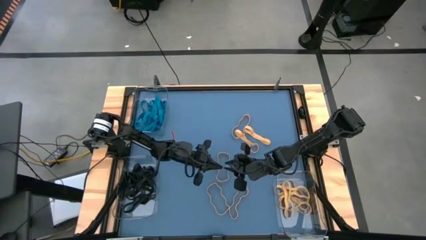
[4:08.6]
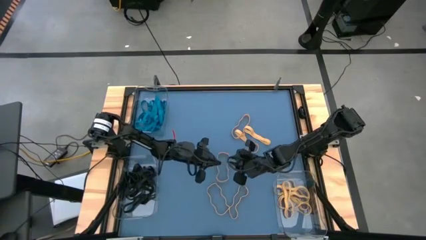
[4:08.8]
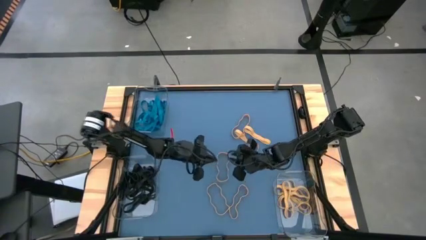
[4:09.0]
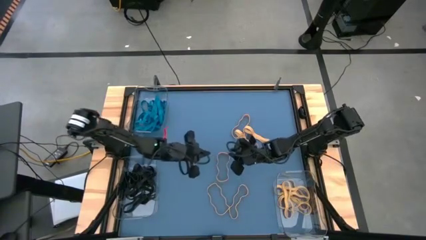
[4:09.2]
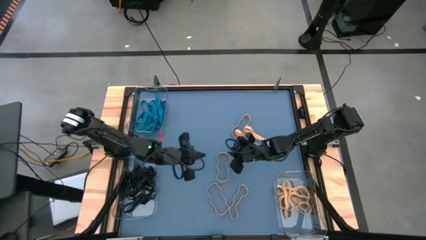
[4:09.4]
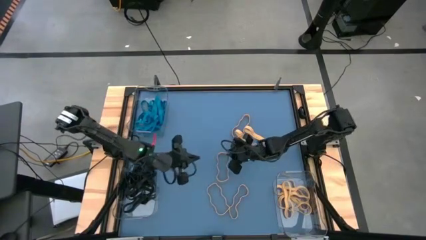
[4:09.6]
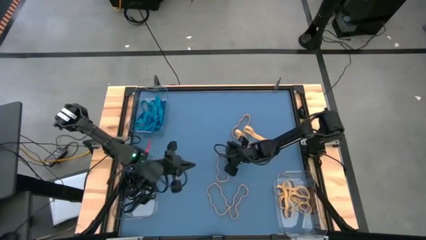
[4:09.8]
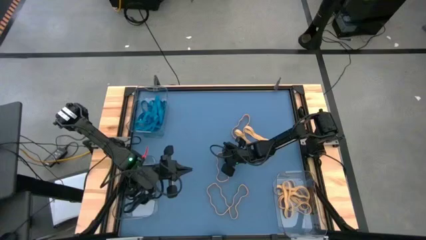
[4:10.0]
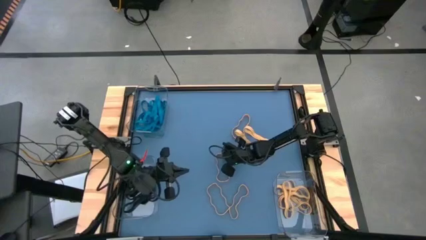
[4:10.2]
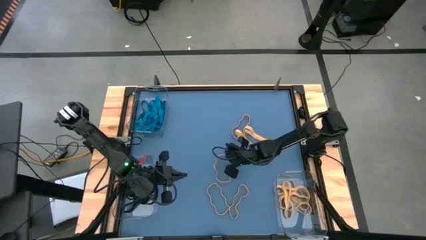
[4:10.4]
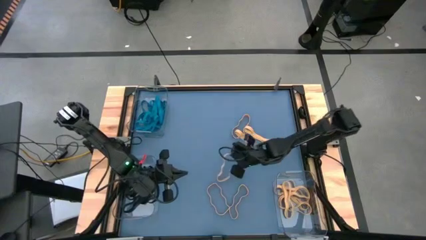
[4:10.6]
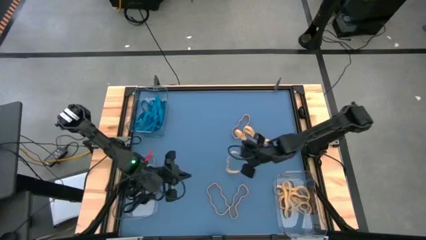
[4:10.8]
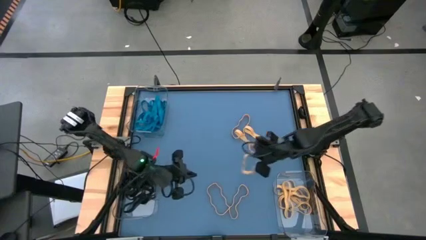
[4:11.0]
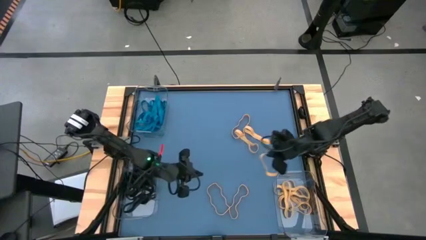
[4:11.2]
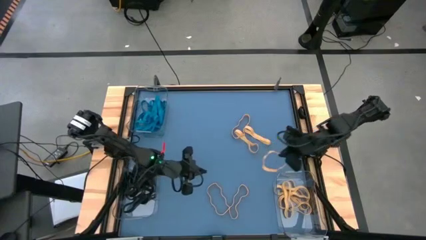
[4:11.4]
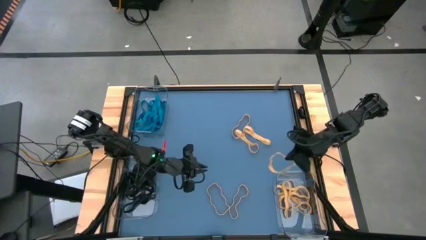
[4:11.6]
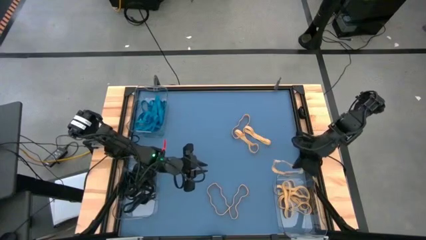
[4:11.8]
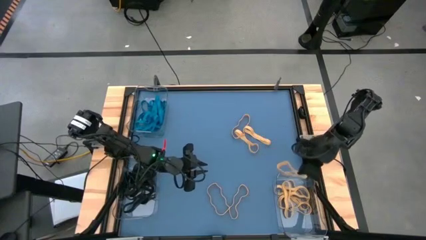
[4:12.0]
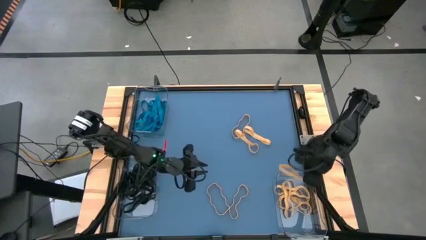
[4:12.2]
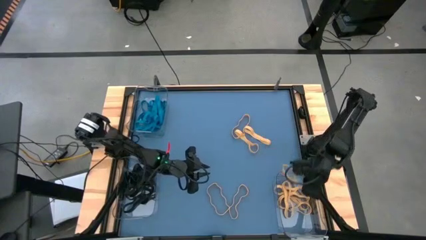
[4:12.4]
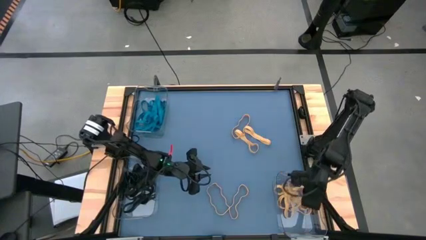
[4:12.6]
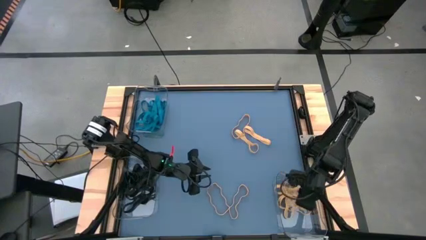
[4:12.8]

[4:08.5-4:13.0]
Task: Sort rubber bands into baskets
Put the yellow rubber band into the bottom right transparent bin

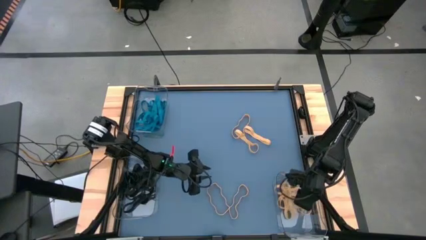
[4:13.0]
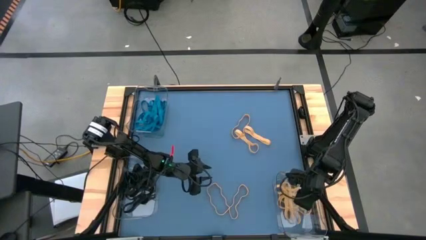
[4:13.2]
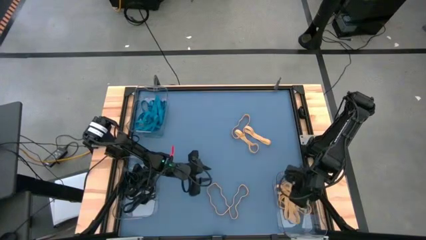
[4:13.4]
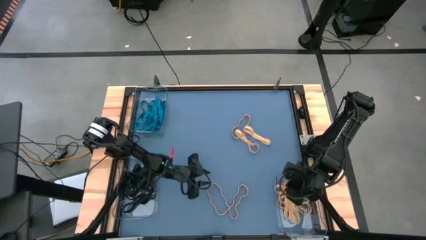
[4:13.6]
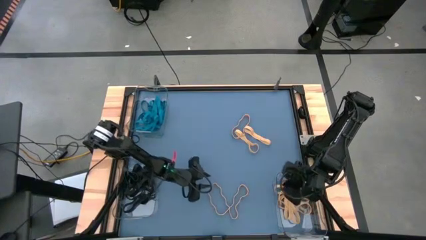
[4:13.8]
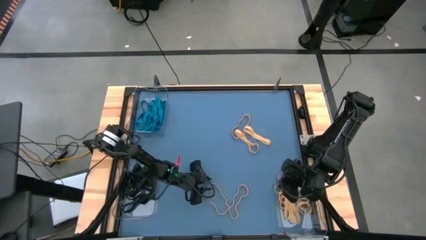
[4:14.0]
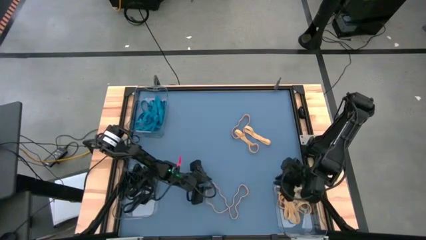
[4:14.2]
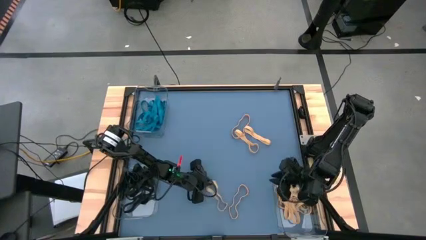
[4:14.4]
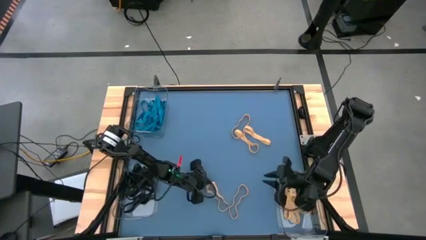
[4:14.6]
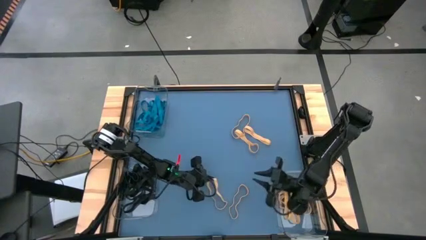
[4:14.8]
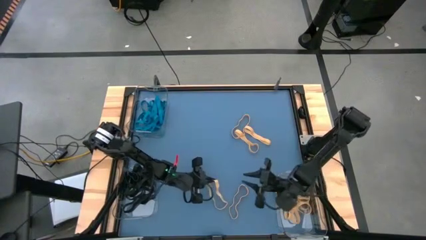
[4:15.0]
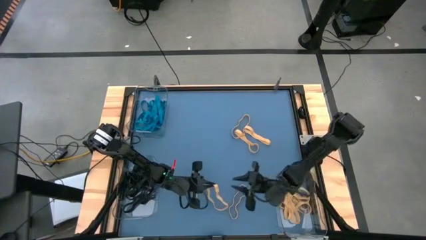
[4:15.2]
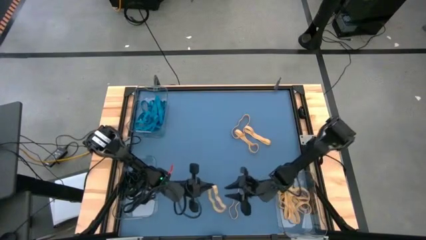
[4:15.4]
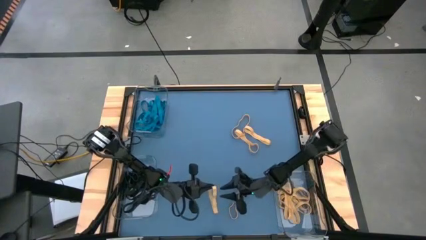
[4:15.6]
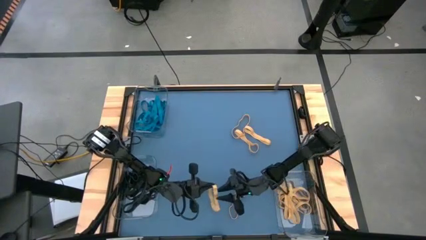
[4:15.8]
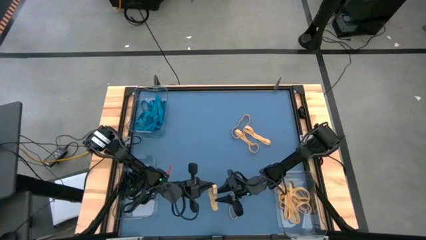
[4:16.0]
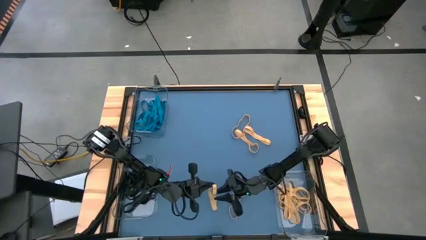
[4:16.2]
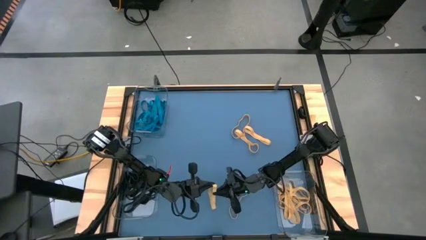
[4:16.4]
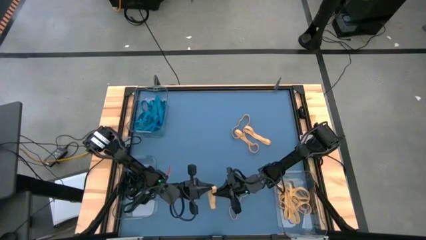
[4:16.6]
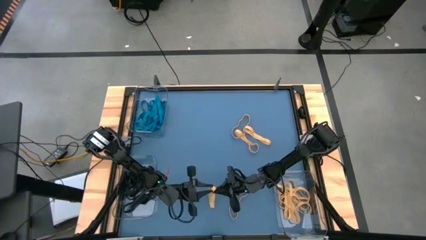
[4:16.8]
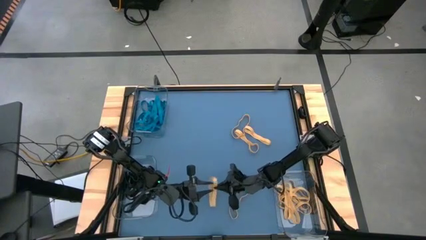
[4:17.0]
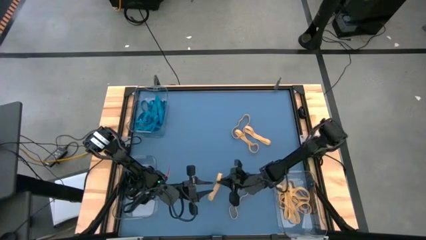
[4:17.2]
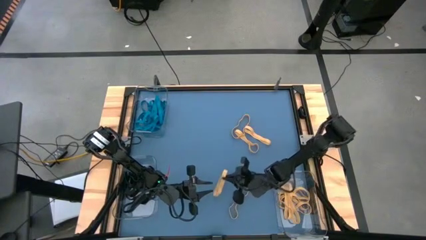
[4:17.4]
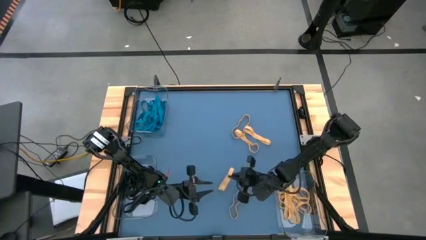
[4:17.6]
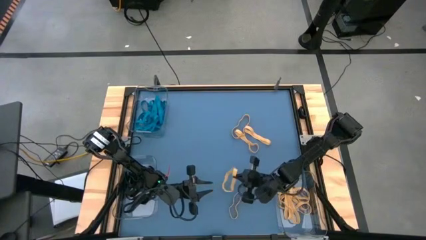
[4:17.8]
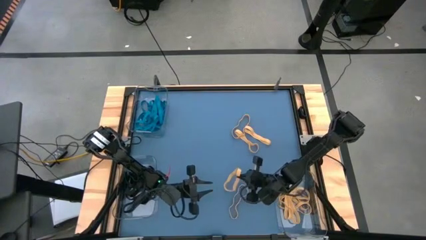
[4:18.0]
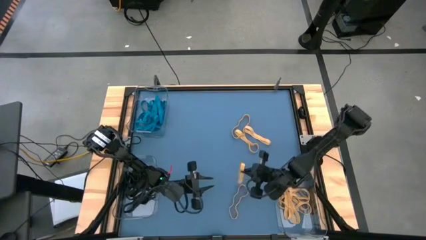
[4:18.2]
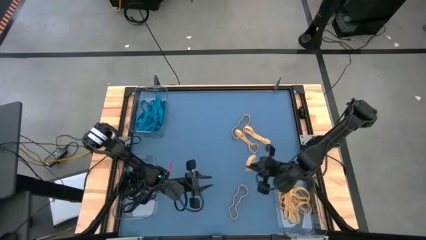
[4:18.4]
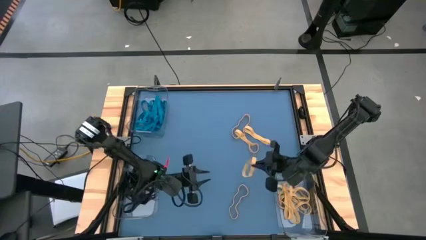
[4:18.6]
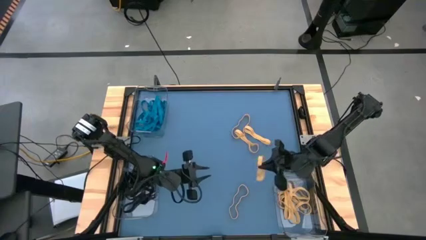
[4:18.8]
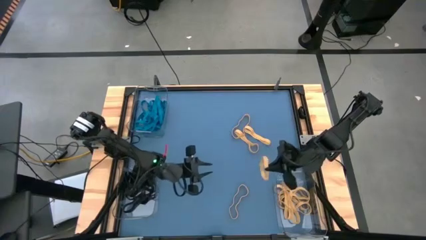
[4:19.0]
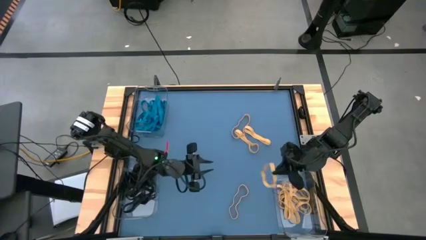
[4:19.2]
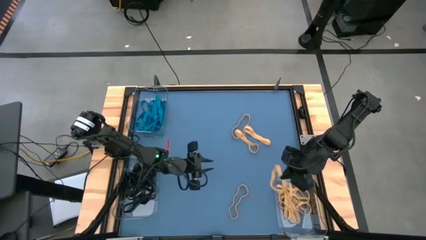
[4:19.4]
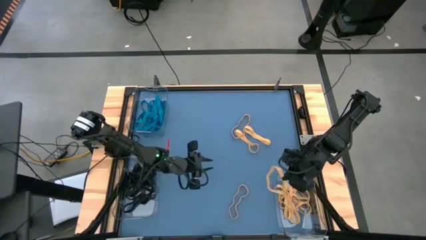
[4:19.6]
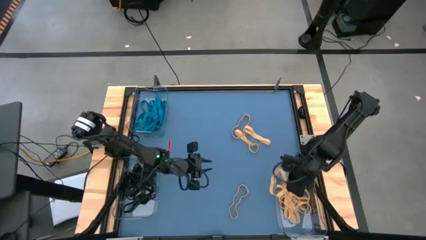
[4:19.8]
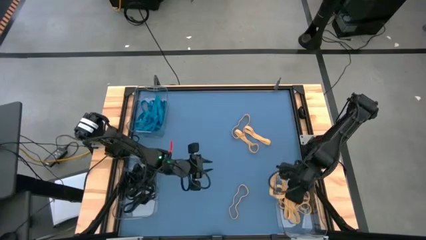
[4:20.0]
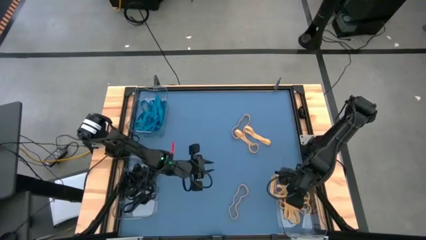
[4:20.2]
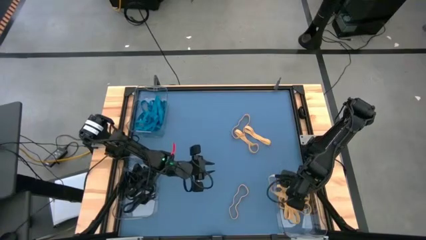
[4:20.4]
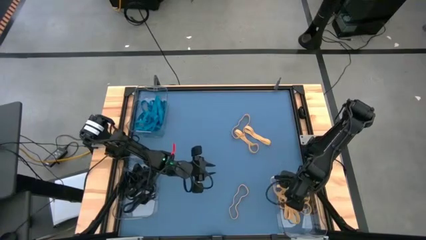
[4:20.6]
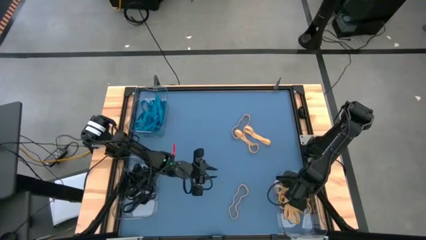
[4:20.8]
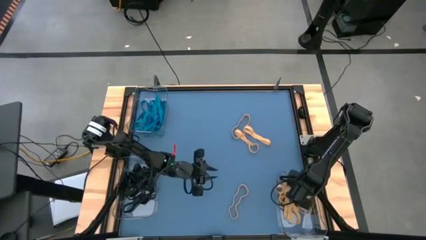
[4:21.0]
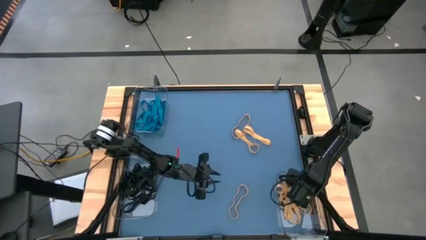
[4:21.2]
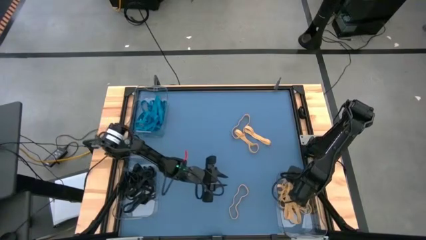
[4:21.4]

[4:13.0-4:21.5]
Put the yellow rubber band into the bottom right transparent bin

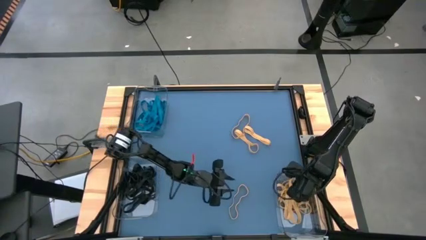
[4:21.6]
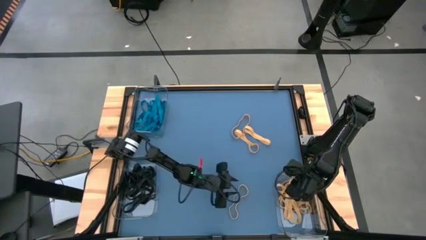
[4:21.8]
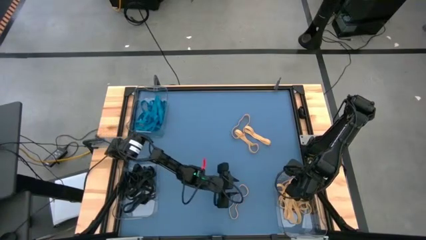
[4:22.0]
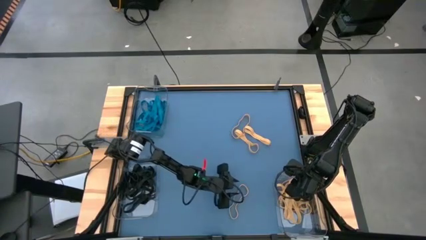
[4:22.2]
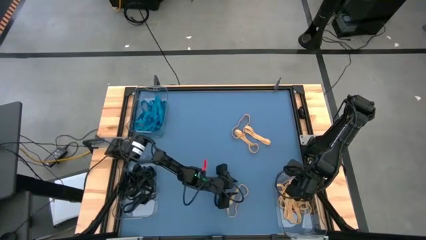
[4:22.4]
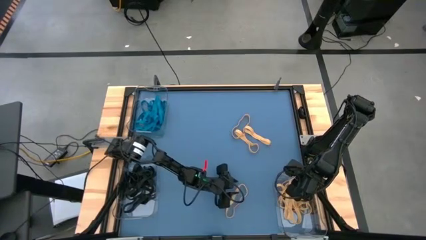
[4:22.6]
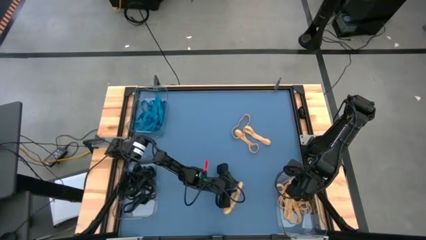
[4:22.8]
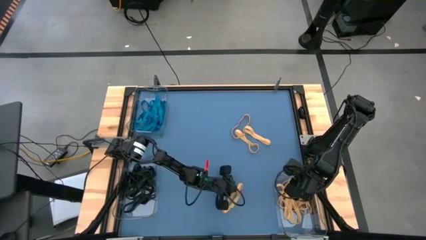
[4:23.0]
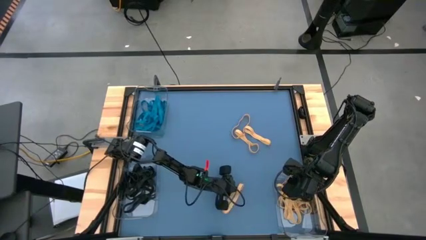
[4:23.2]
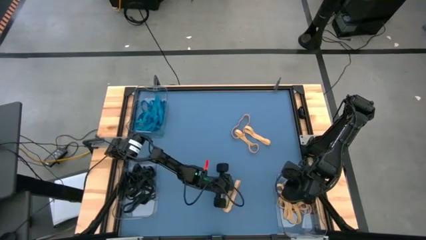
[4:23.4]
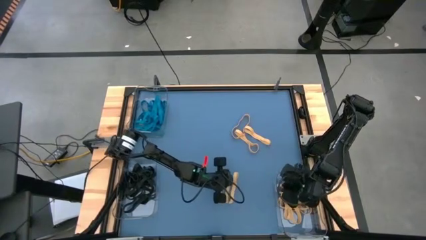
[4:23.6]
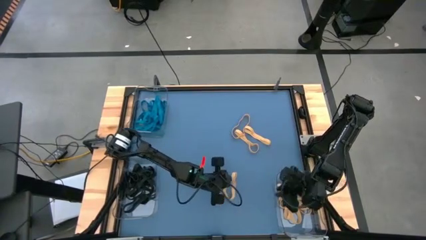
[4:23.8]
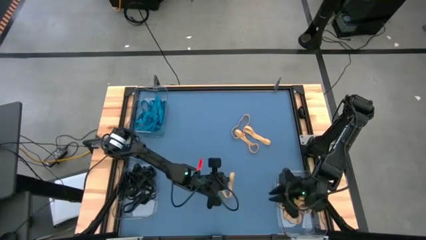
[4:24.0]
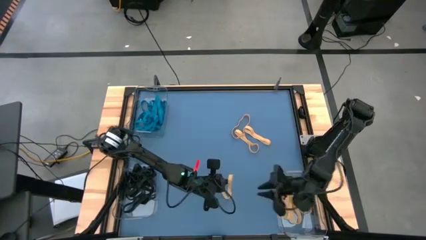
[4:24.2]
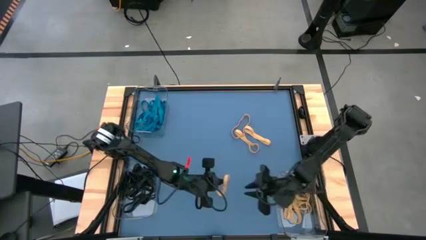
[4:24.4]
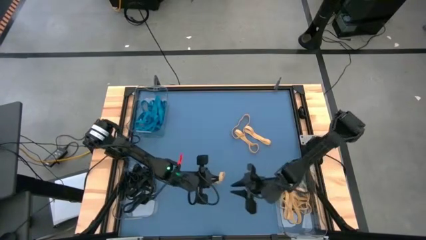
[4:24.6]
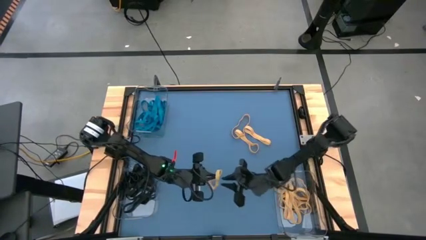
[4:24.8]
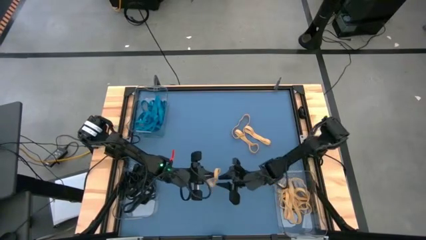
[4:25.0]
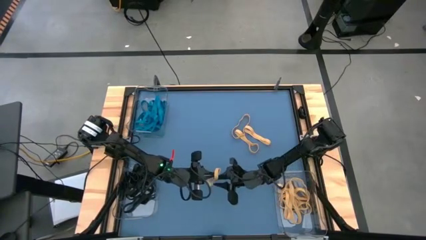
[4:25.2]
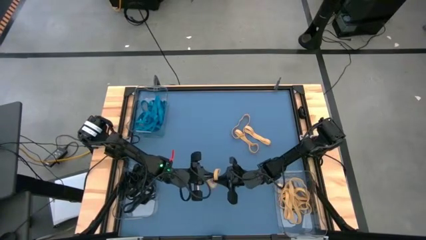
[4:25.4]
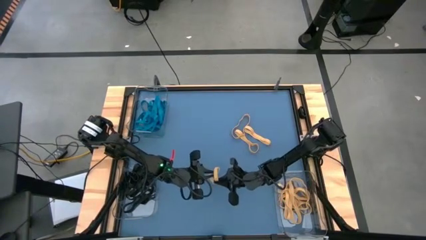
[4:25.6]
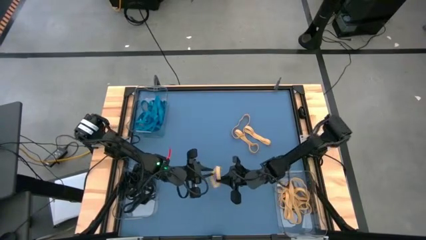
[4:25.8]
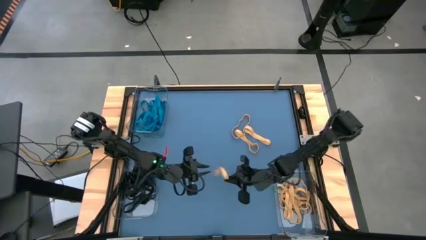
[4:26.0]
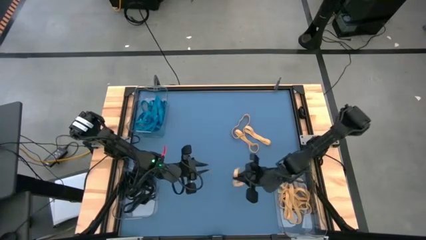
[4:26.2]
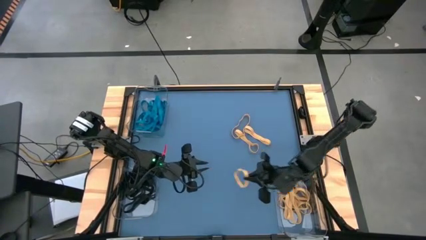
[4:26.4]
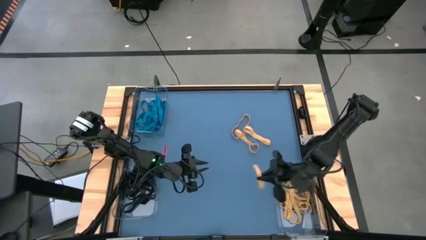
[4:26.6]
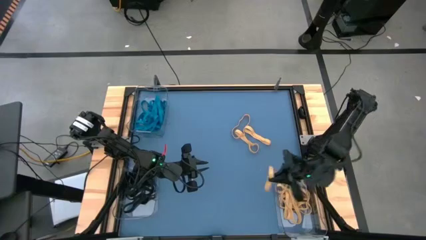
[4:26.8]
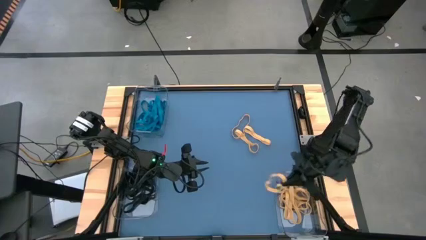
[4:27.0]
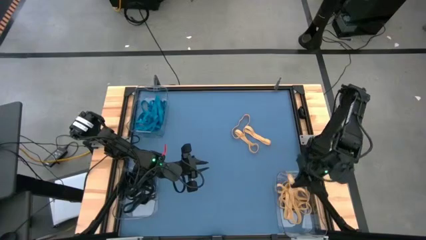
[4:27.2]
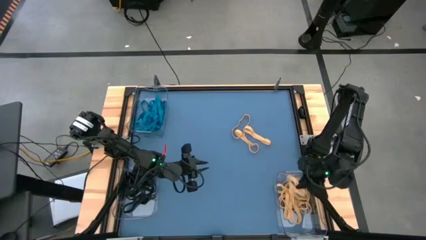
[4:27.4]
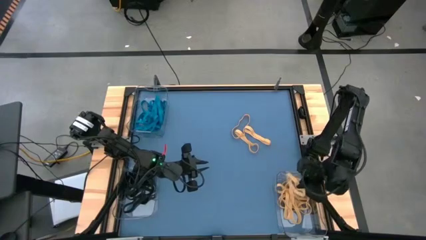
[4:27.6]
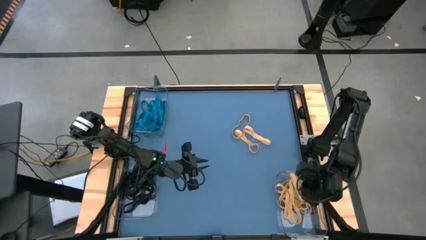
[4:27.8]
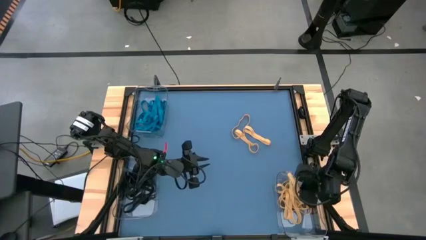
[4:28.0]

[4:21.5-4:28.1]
Put the yellow rubber band into the bottom right transparent bin
